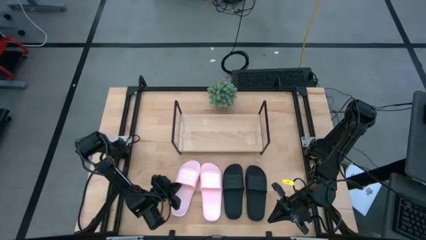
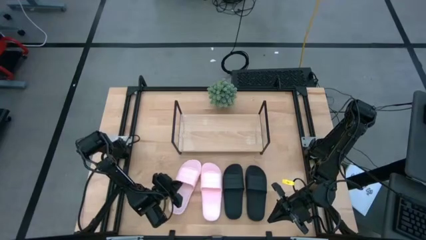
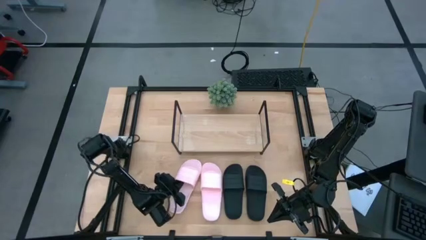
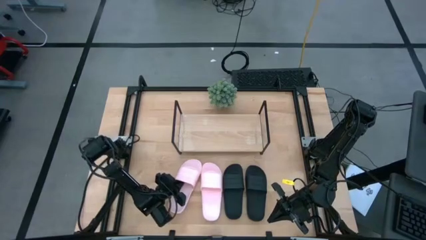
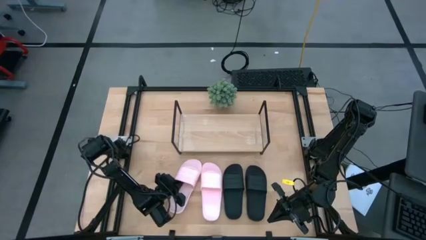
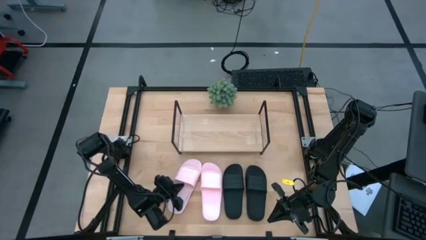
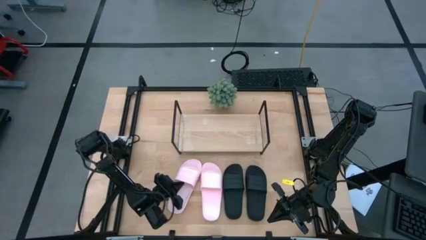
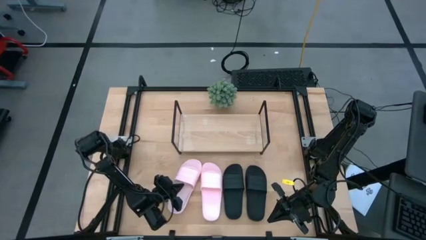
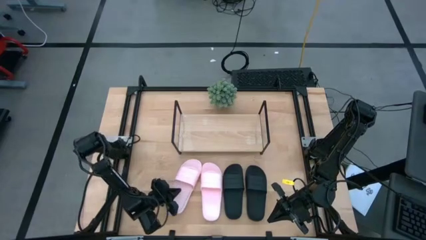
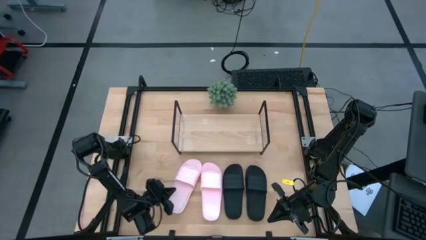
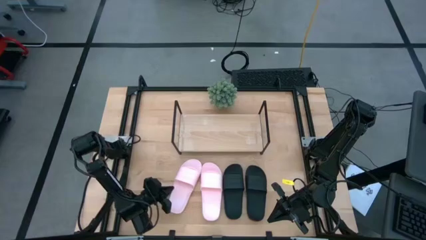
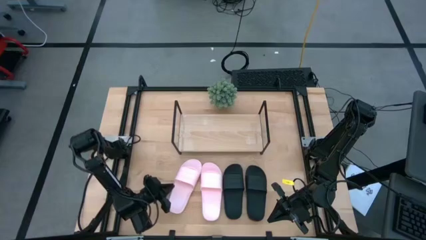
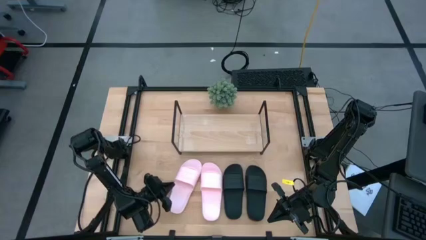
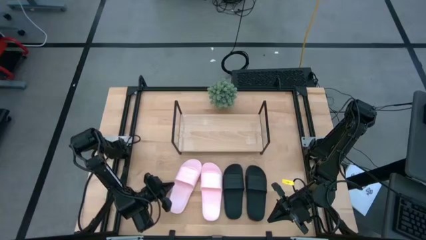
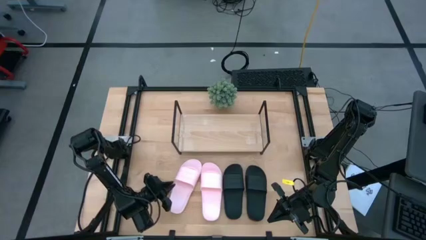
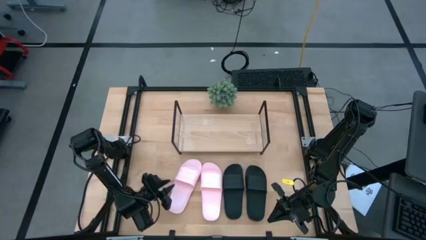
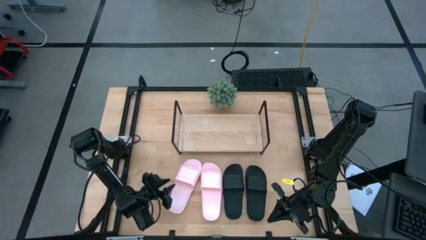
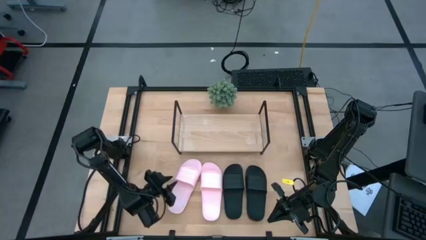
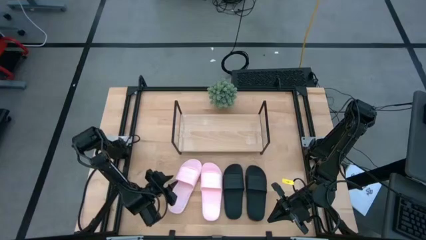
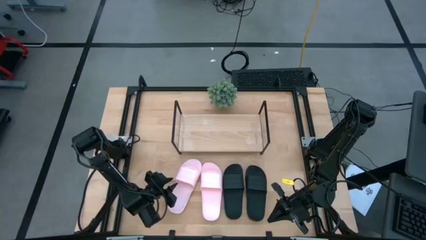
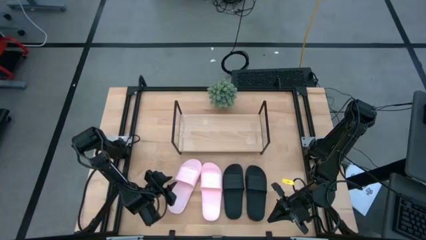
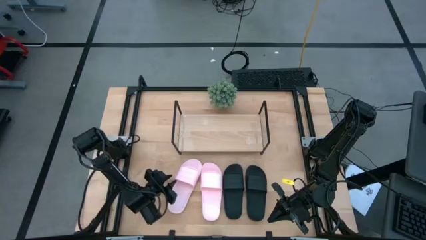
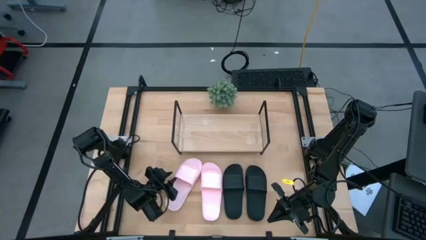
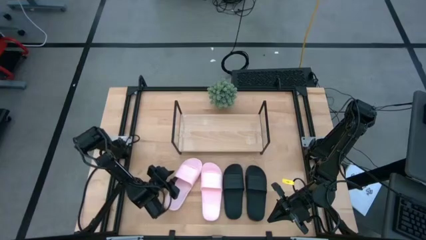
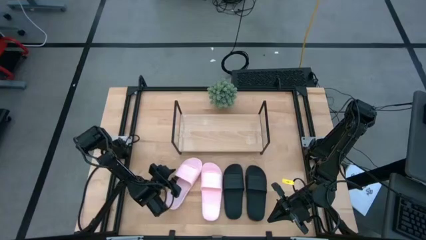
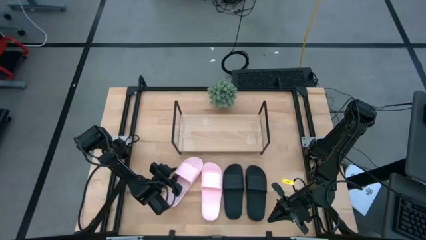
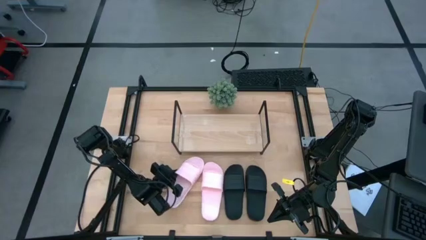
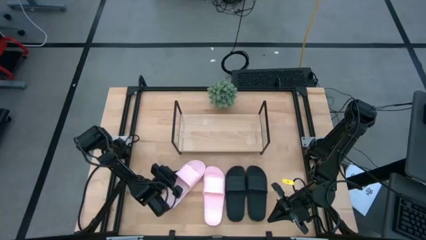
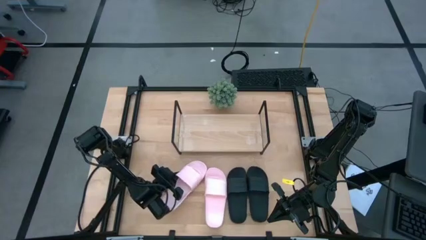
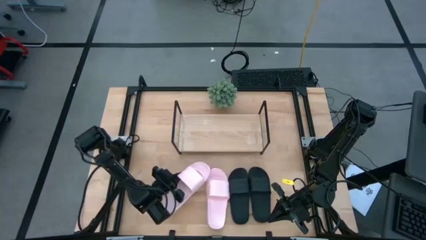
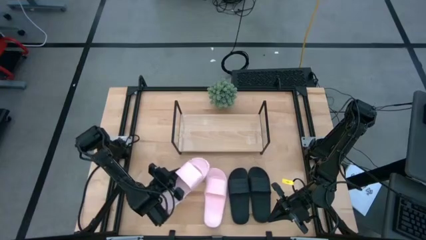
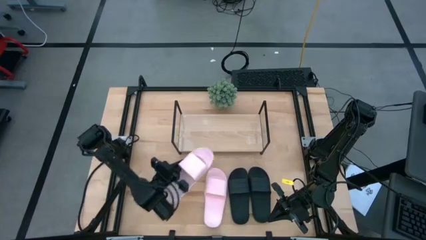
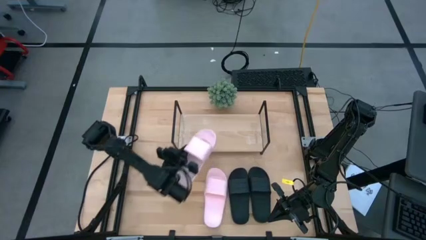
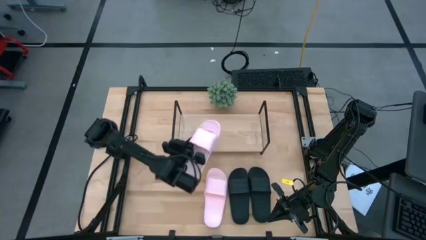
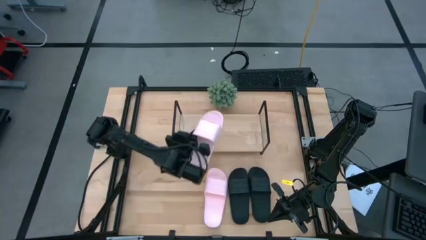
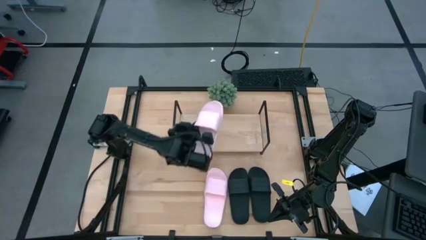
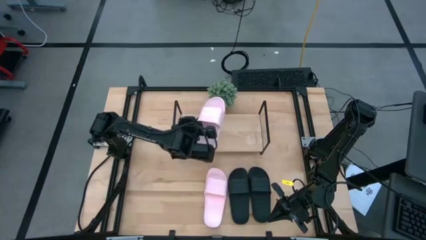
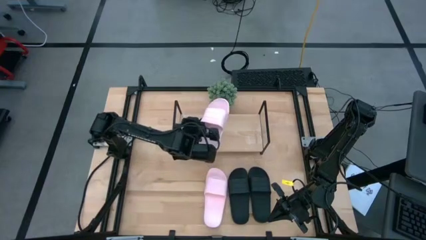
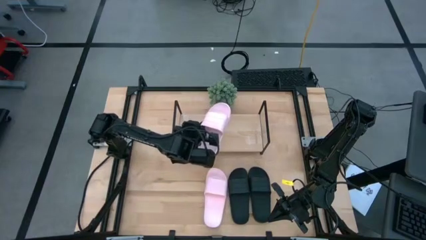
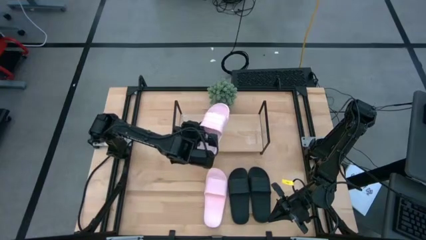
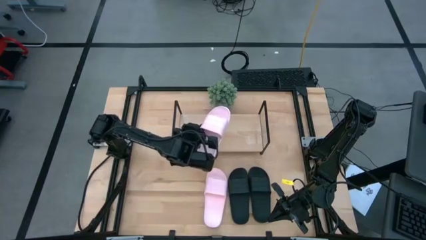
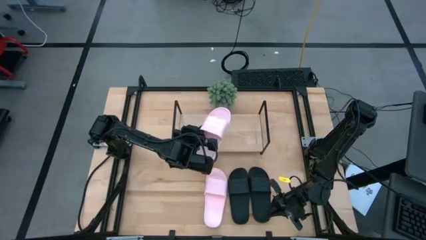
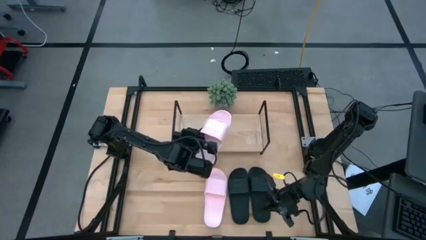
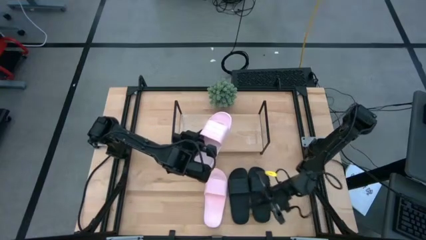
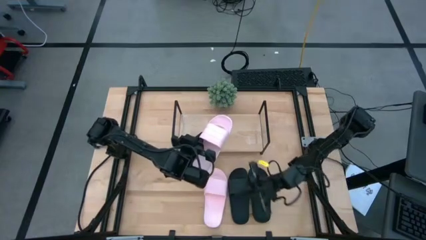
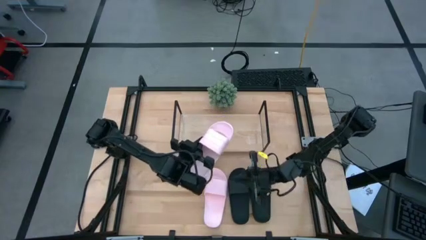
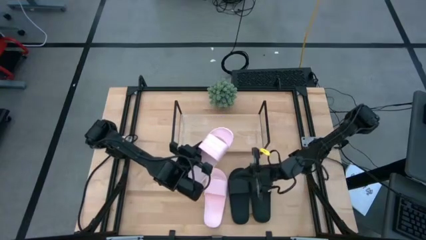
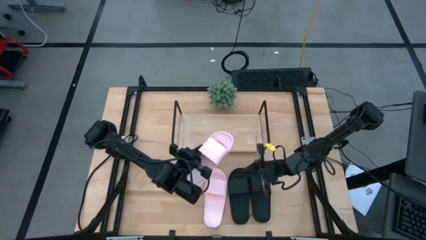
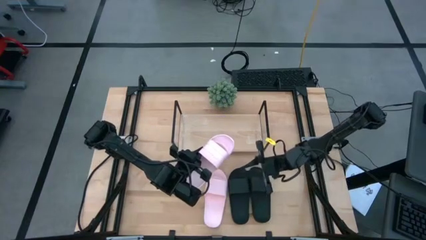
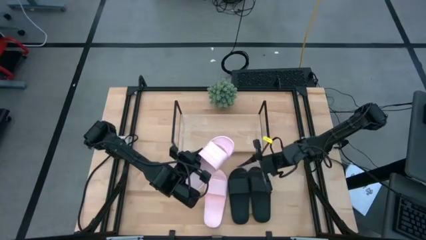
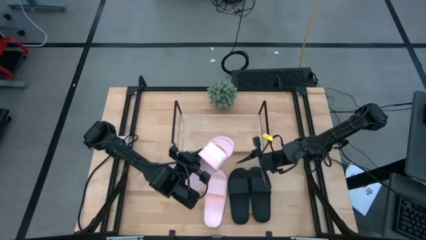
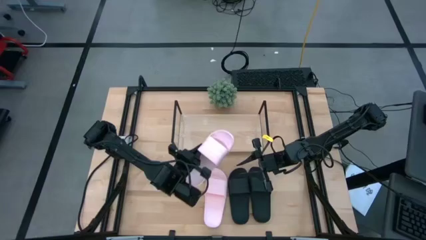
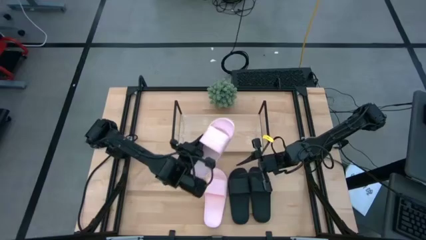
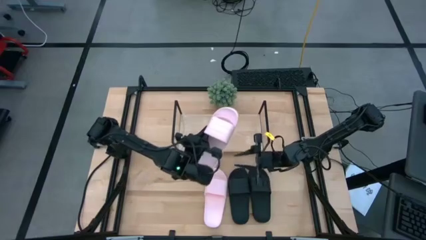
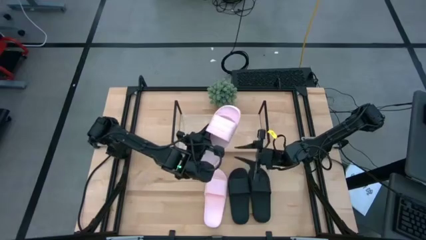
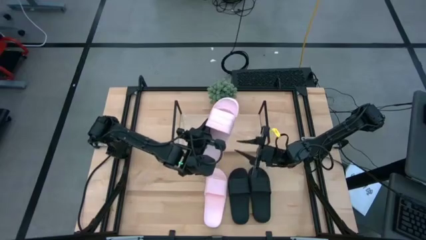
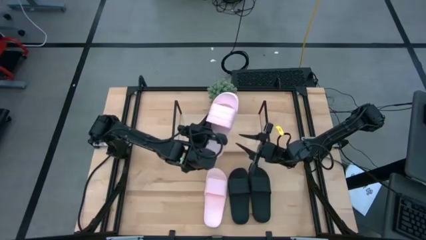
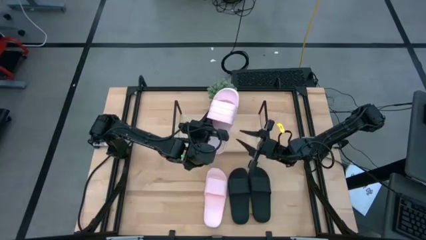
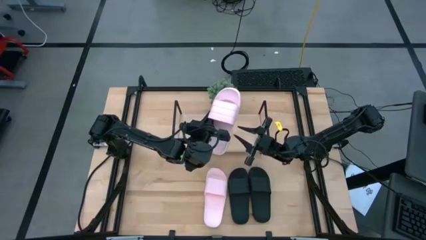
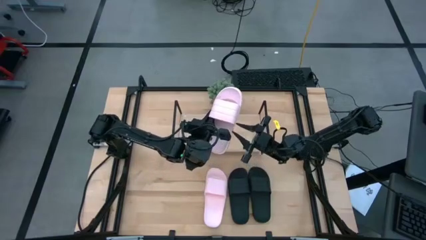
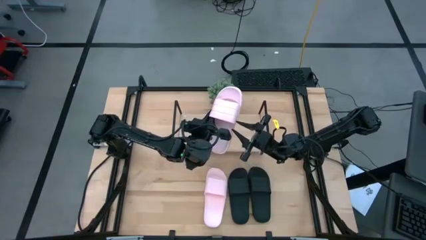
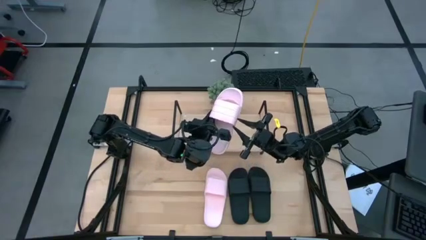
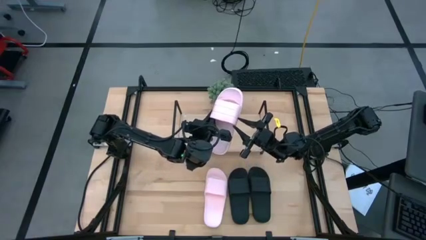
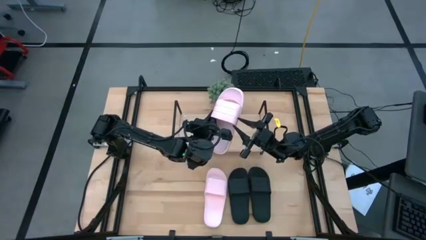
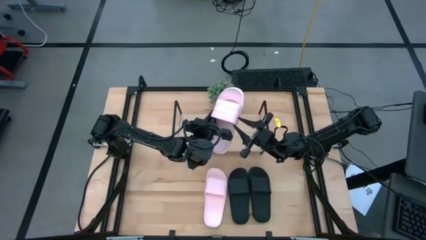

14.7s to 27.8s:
Task: Pick and place slides into the shelf
Put the pink slide on the shelf
